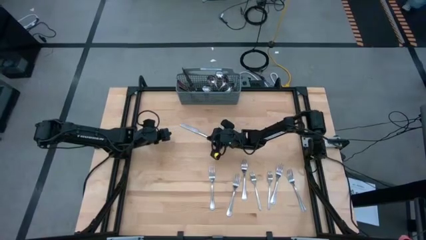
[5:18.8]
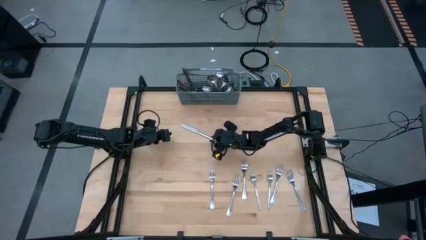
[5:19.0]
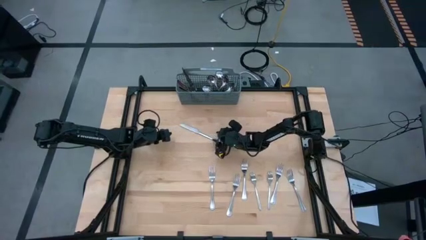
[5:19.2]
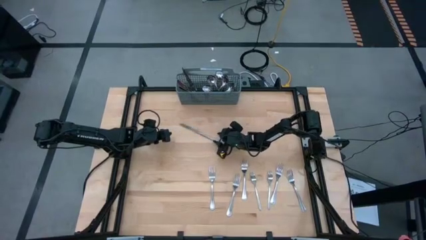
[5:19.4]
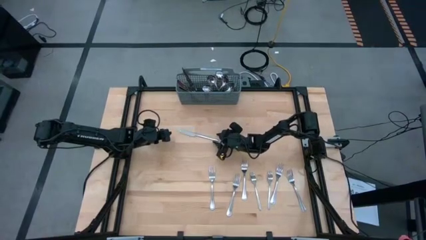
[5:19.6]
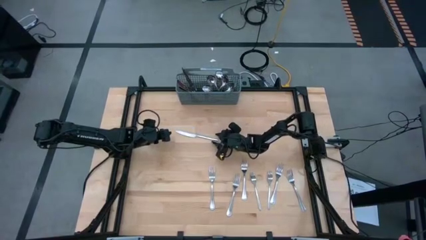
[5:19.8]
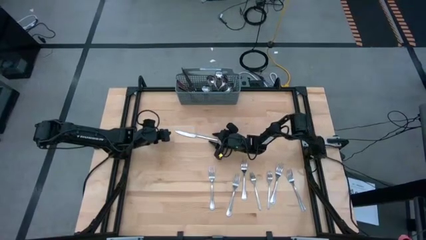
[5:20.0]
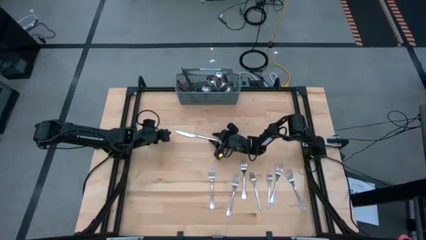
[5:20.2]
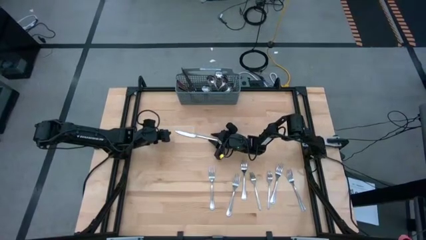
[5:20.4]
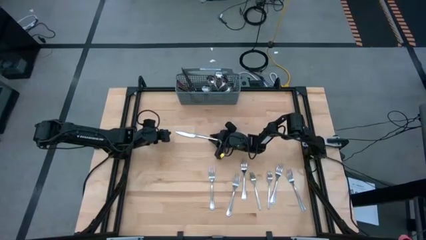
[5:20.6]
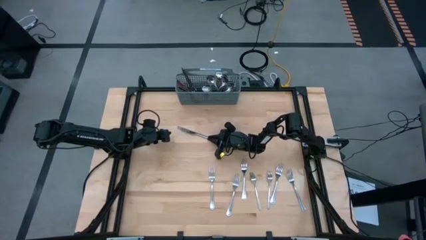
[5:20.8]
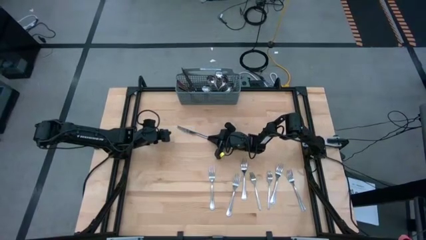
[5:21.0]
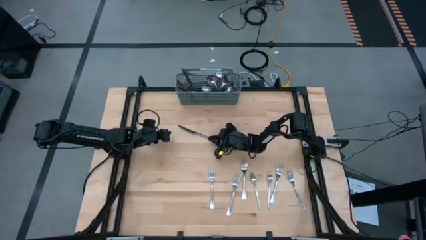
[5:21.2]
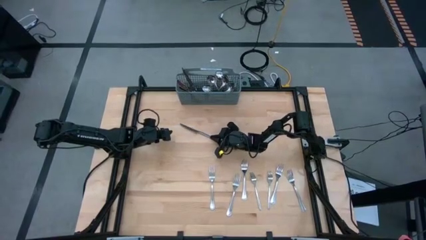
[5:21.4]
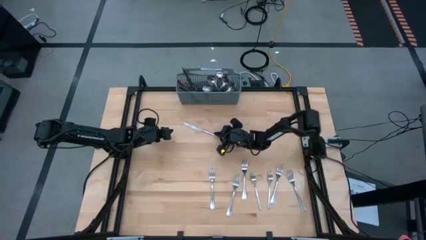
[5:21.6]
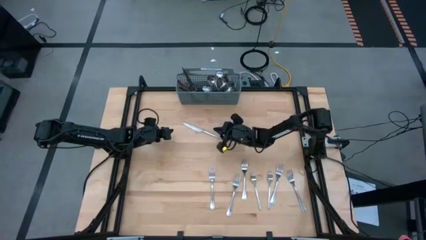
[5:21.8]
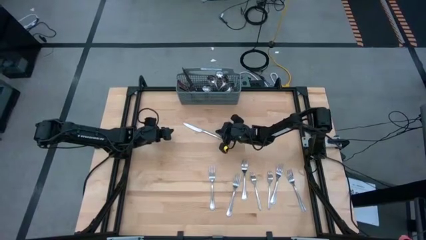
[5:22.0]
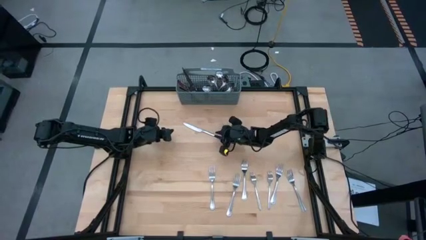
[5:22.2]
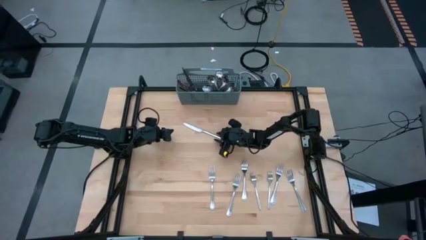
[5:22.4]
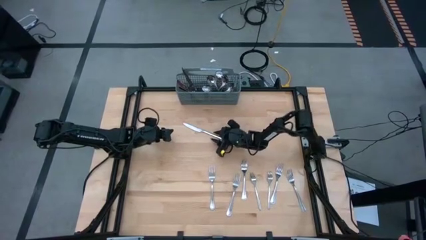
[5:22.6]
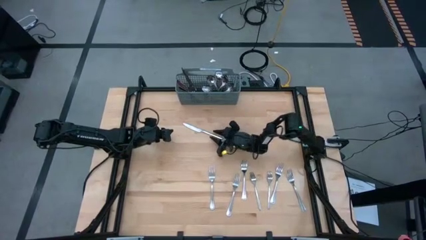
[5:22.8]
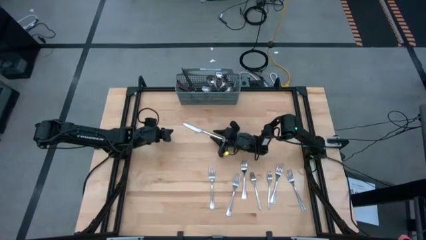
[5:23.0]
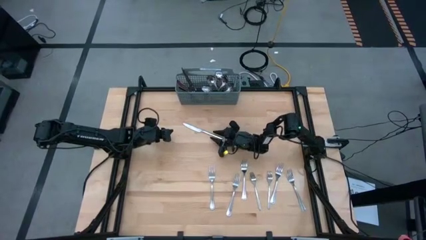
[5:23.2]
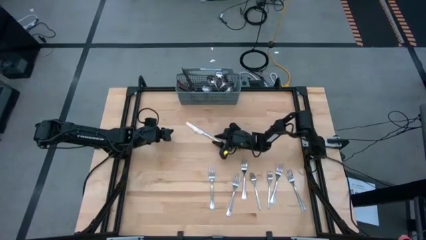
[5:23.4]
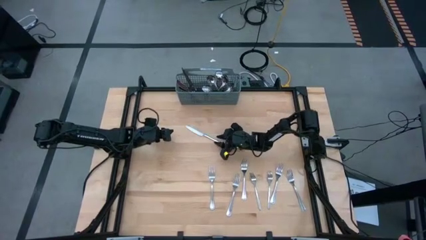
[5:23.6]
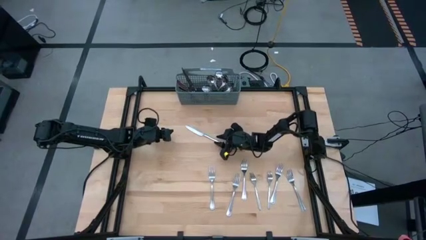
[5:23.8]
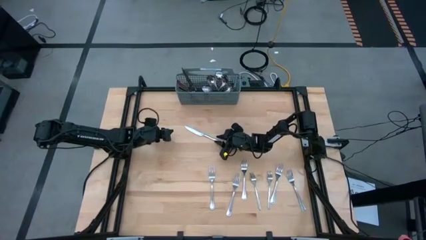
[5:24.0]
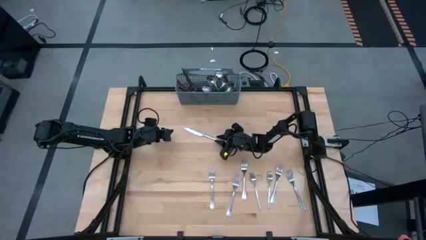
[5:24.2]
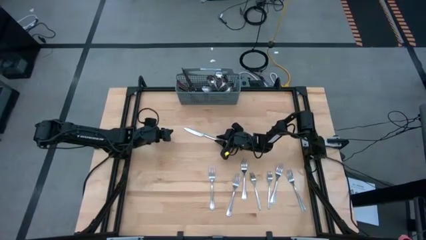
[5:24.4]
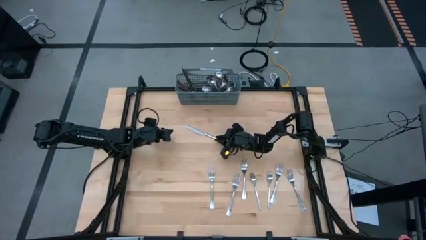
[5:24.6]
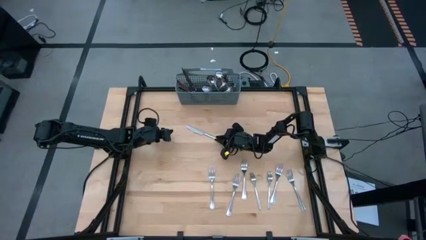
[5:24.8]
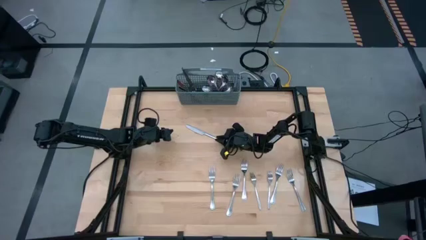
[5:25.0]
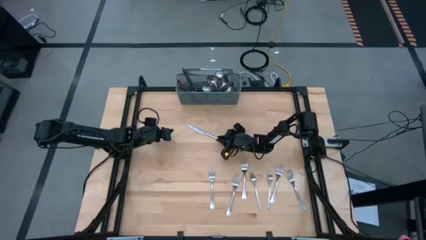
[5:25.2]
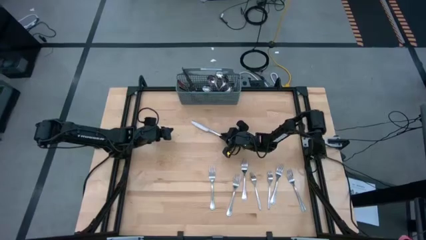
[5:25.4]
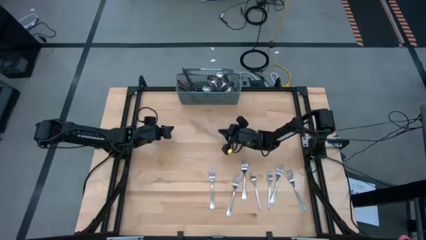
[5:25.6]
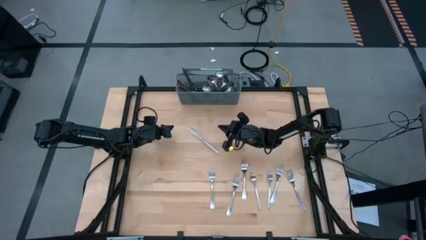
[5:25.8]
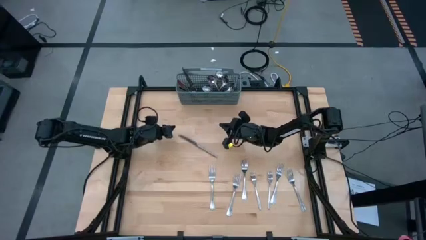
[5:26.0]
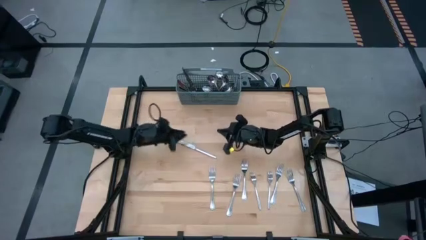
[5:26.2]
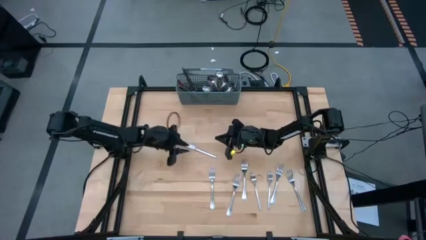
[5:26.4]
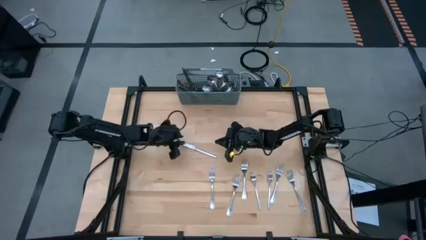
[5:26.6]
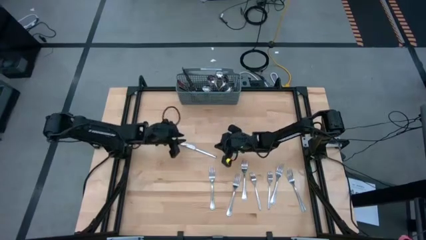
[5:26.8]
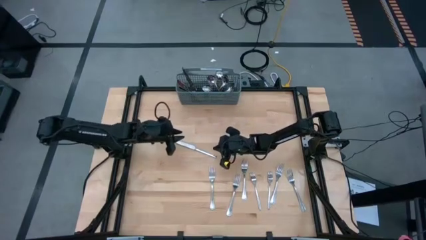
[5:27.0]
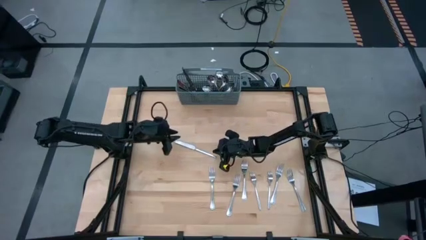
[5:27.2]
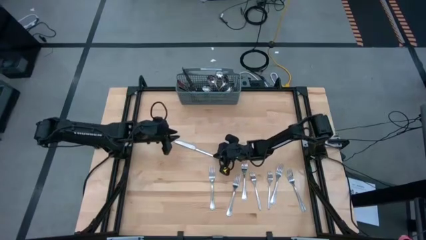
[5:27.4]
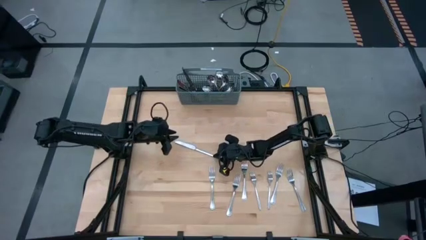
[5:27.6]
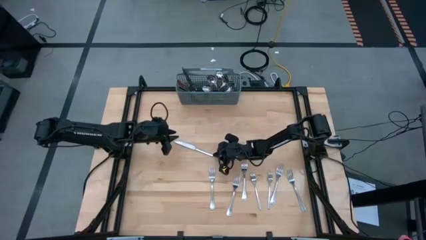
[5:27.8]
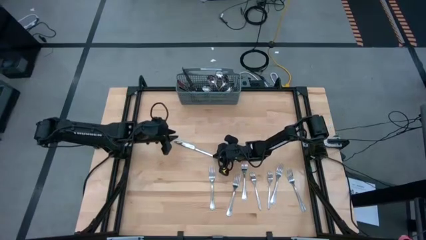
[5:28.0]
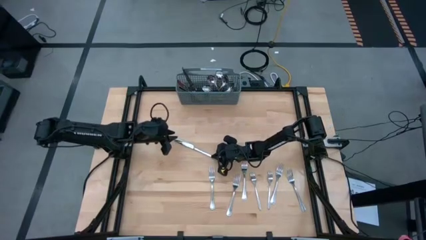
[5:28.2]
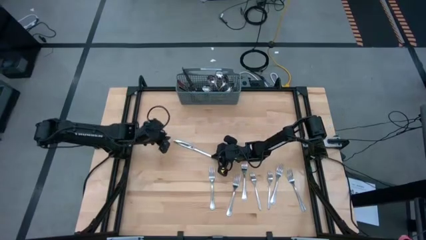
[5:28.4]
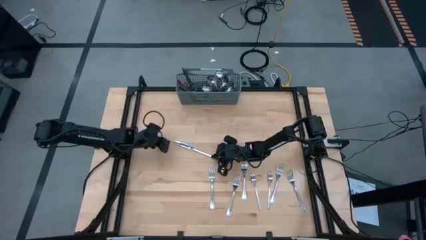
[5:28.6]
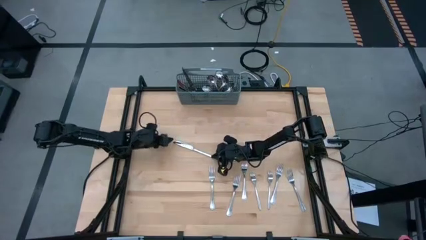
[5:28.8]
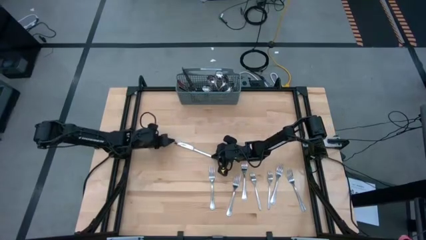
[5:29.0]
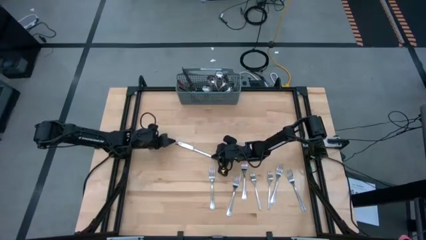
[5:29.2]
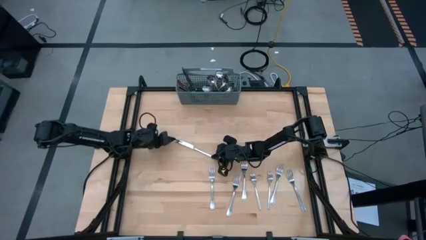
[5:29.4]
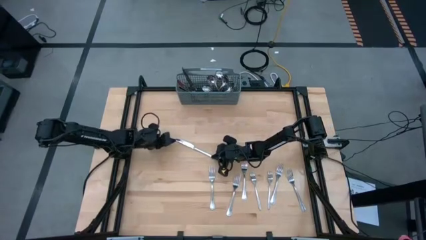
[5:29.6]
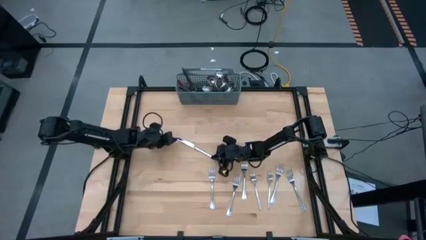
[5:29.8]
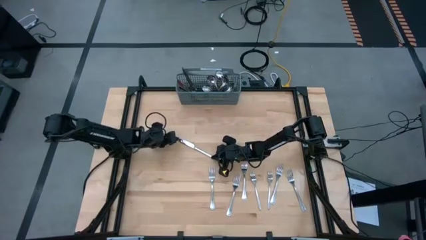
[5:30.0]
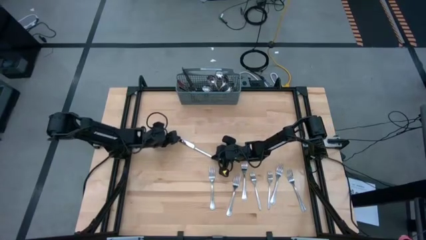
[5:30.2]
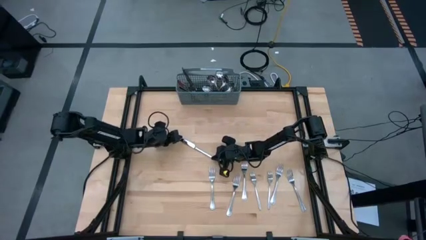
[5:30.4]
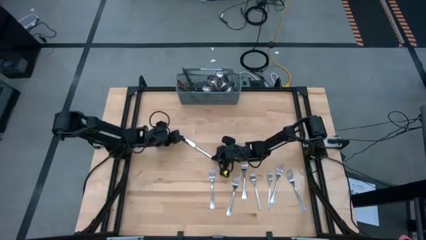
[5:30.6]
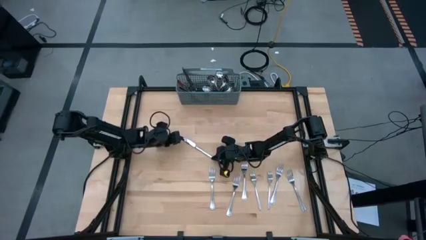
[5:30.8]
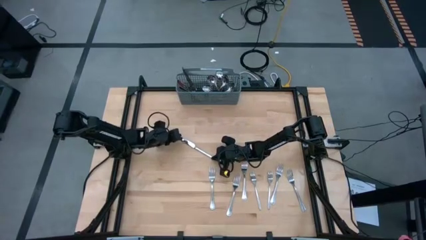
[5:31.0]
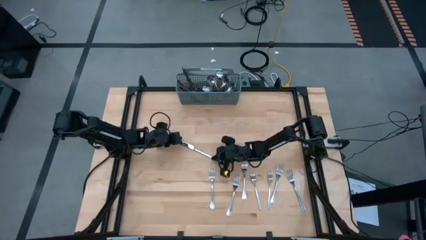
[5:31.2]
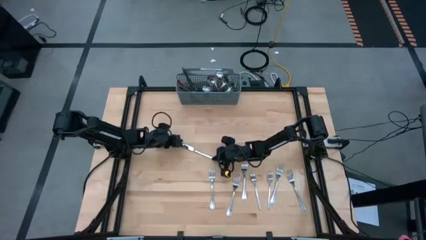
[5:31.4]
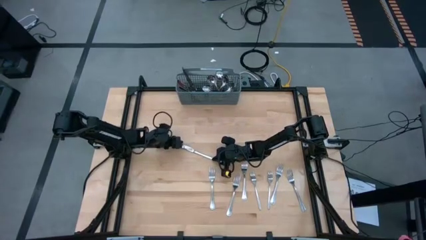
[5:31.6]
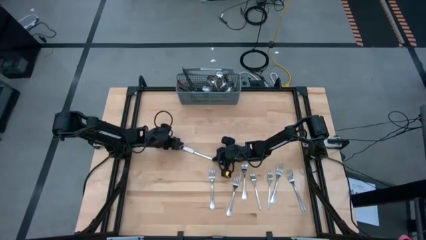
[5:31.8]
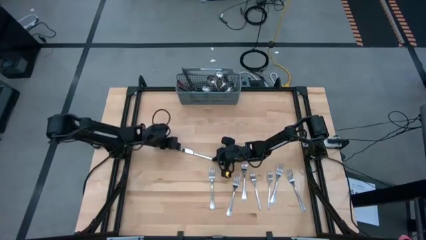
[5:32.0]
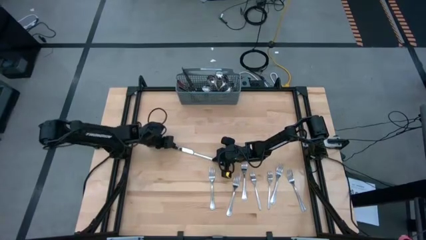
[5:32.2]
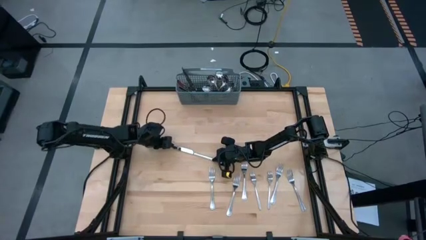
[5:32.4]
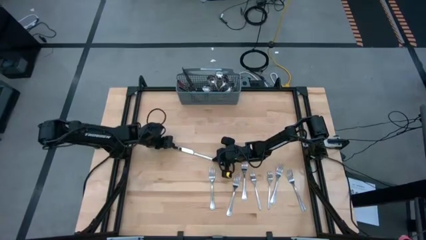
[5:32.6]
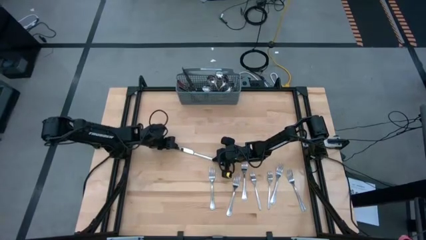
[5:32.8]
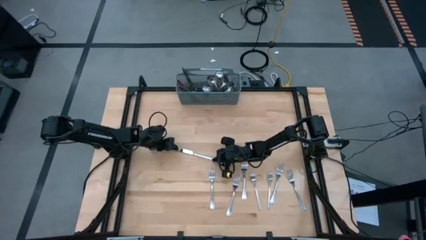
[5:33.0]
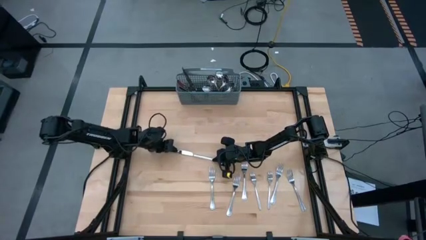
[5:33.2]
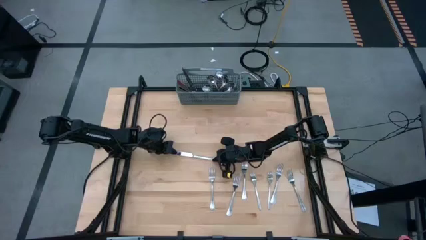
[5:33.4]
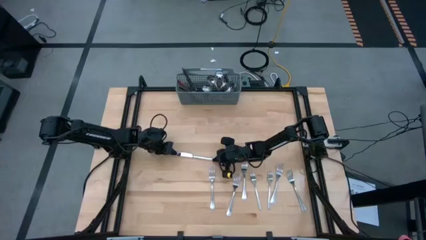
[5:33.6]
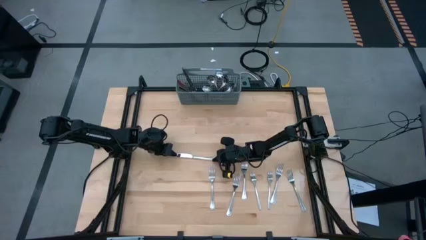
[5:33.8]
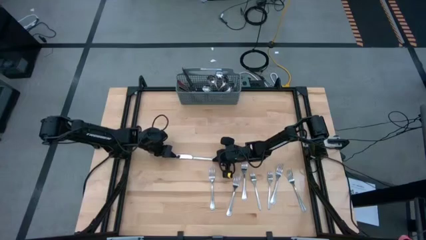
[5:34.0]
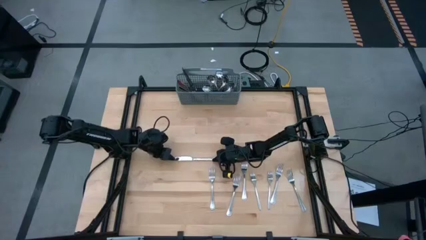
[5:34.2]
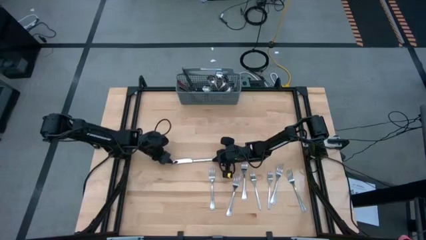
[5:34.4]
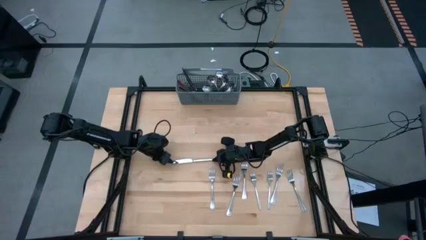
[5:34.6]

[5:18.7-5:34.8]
Task: Sort silverware
Put the silver knife into the gray utensil holder
